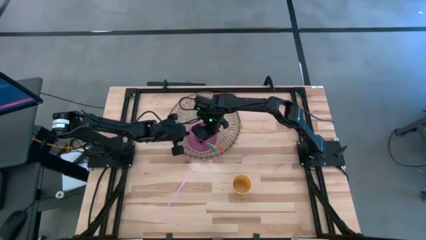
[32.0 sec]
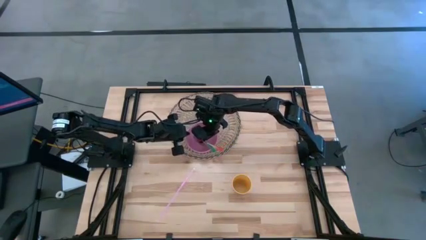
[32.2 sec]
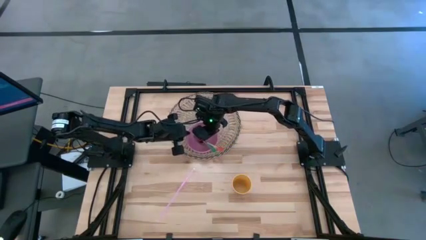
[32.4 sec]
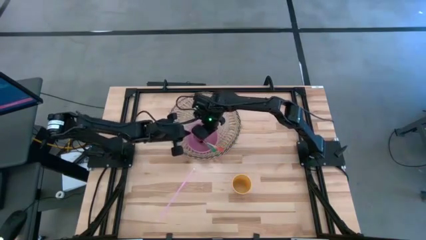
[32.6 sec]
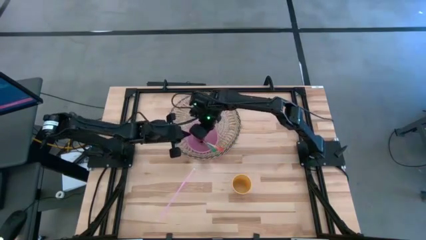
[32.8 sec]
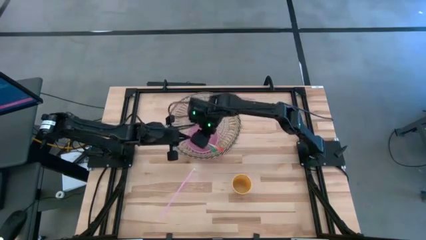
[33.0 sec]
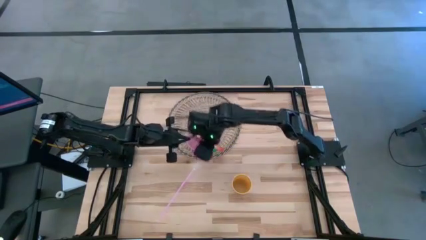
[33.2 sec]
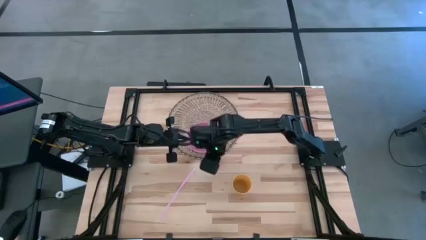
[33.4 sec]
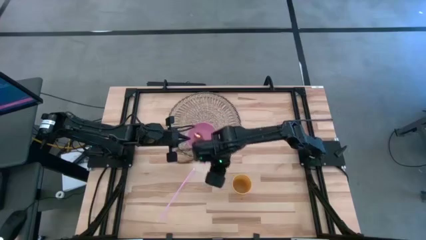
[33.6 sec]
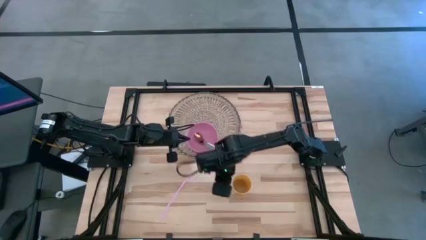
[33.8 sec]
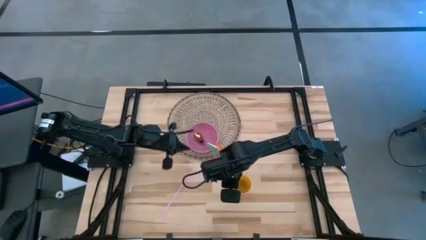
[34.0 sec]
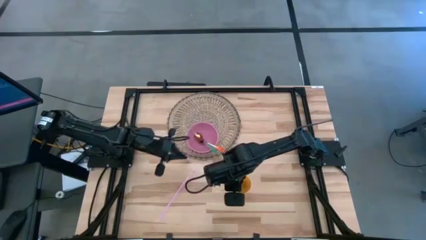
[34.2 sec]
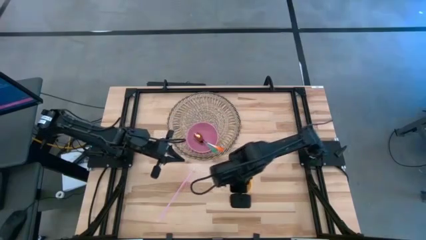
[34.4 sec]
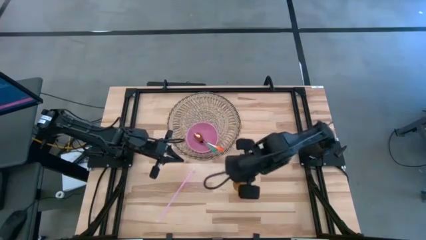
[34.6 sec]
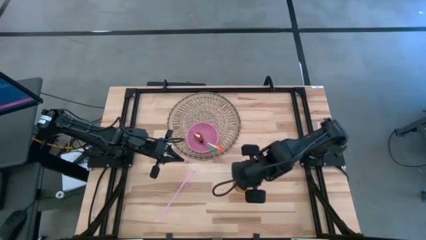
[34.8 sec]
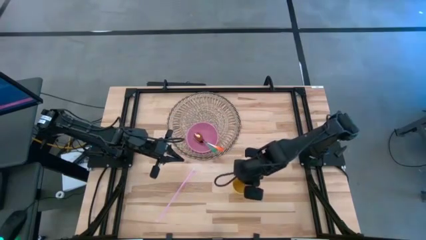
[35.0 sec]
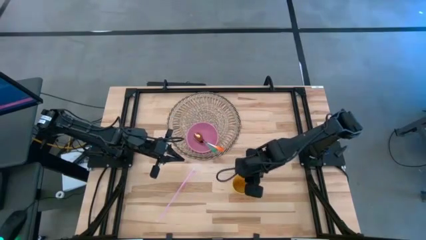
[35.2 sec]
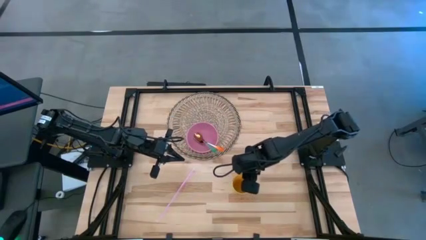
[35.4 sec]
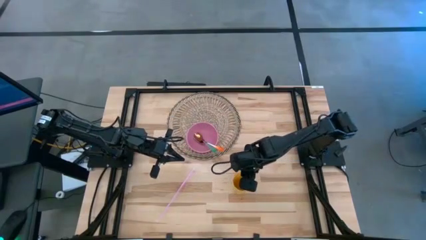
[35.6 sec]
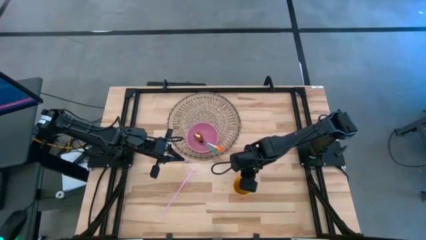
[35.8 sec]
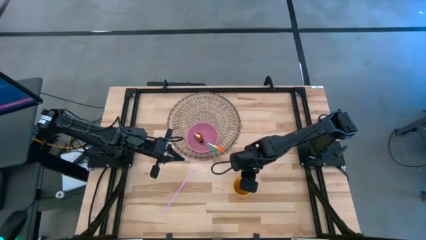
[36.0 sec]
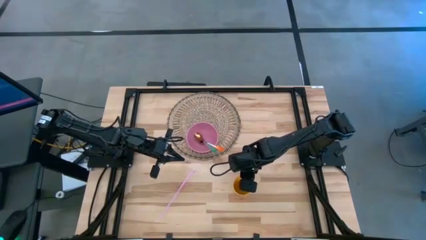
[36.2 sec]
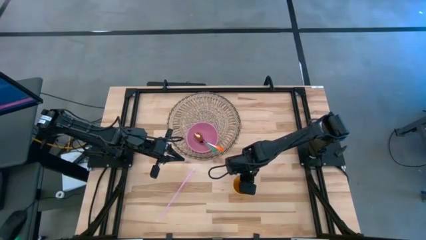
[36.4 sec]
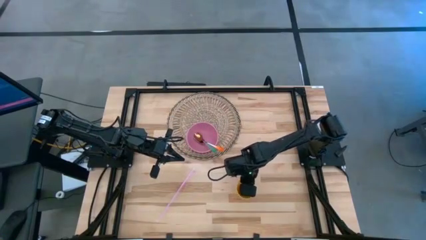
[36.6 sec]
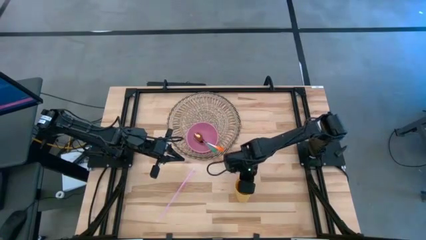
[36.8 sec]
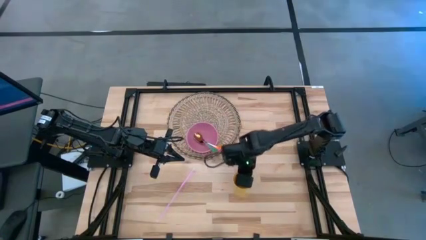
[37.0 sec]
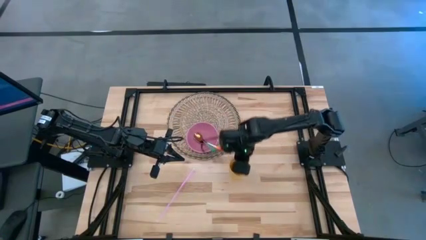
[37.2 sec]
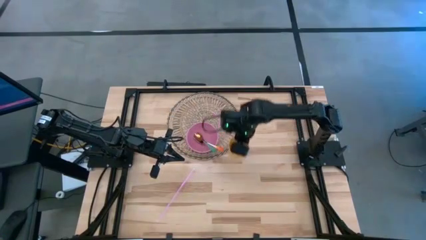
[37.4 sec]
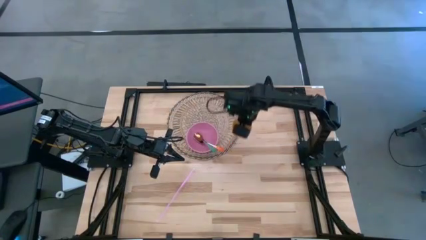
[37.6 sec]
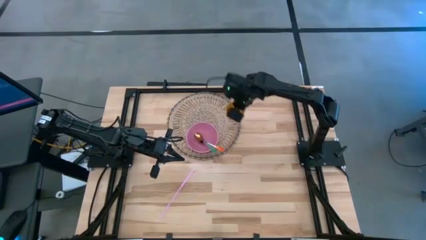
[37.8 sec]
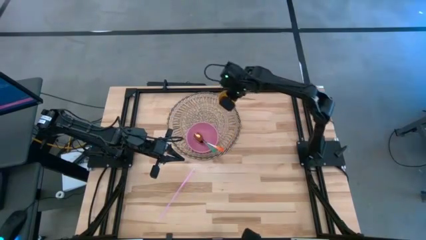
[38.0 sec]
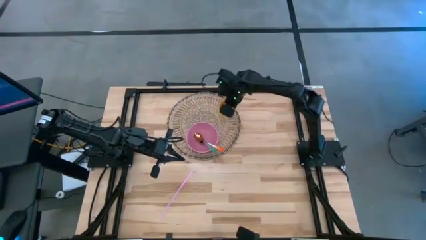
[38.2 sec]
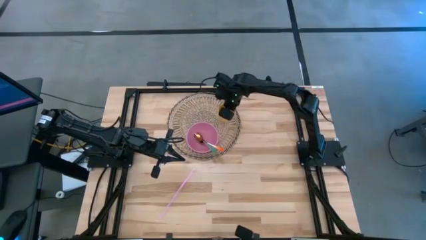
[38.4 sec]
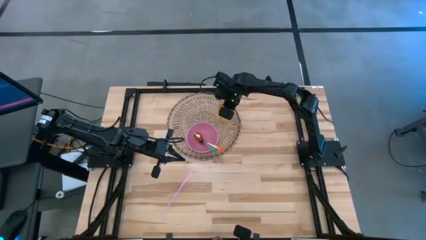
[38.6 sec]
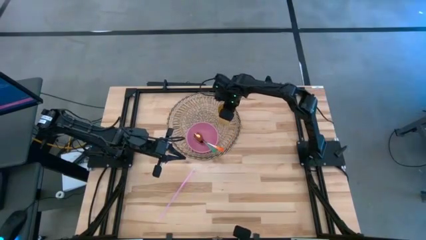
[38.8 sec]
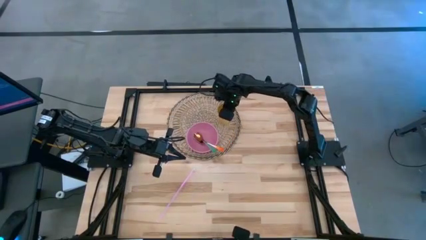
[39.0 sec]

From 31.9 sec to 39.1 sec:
Task: Pick & Place Utensil
Put the yellow cup on the brown table mat

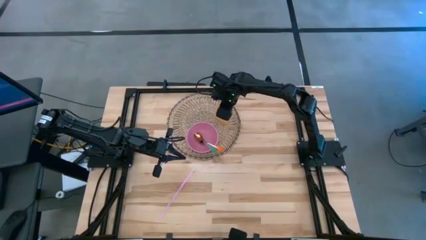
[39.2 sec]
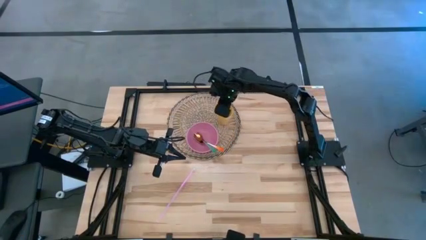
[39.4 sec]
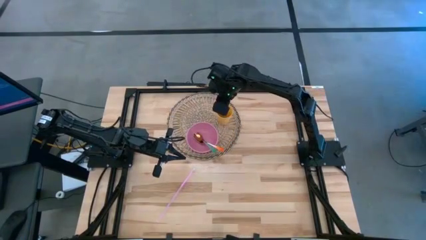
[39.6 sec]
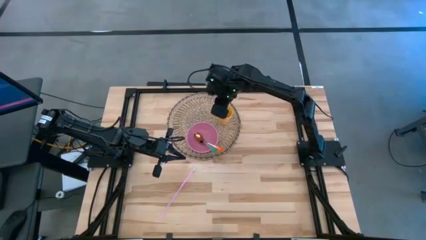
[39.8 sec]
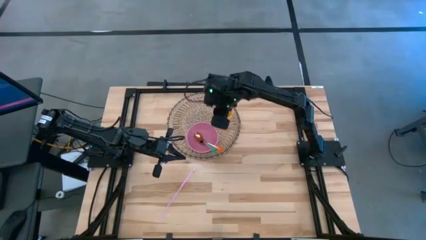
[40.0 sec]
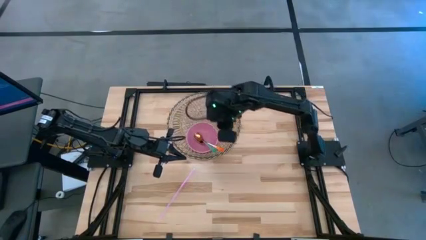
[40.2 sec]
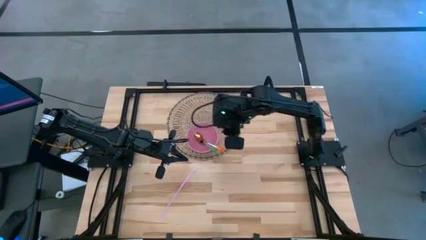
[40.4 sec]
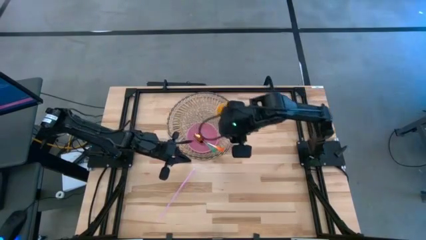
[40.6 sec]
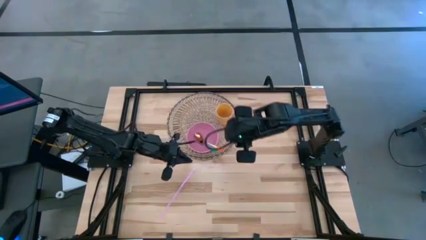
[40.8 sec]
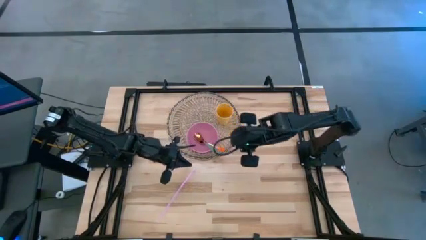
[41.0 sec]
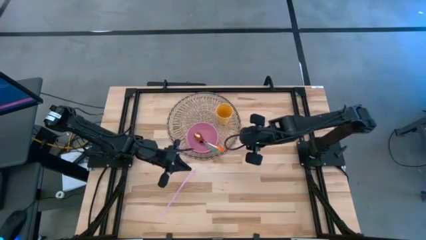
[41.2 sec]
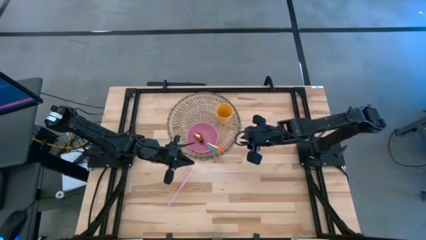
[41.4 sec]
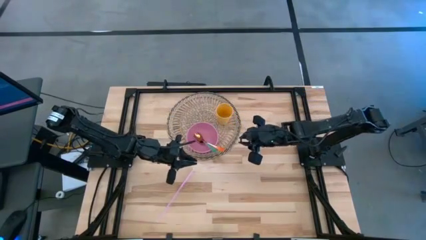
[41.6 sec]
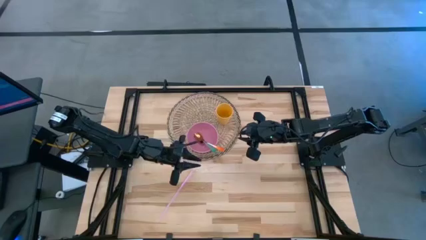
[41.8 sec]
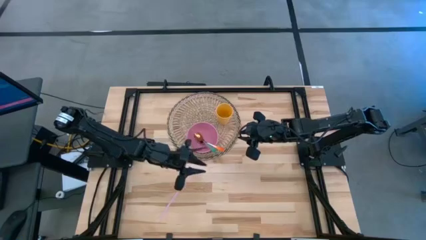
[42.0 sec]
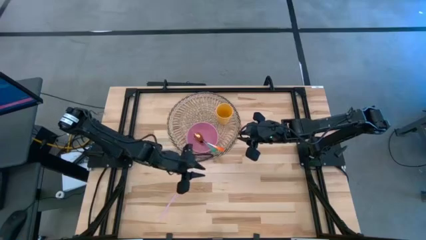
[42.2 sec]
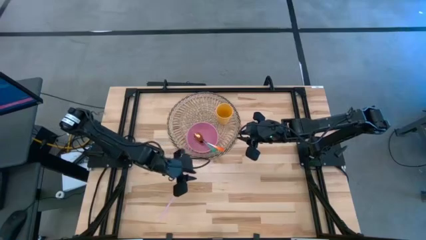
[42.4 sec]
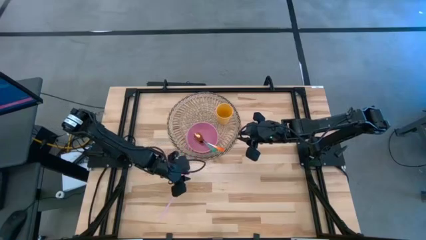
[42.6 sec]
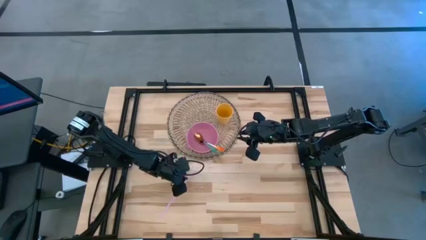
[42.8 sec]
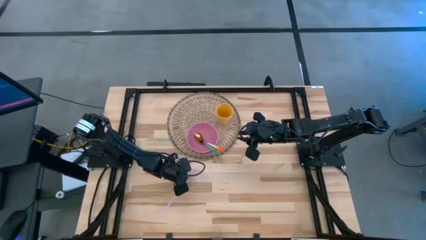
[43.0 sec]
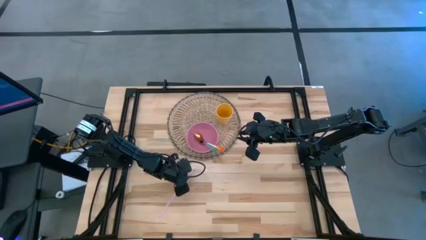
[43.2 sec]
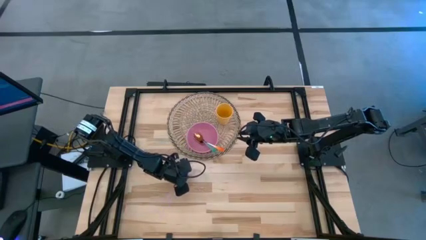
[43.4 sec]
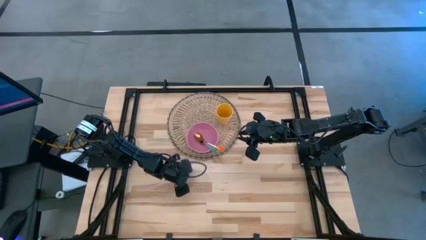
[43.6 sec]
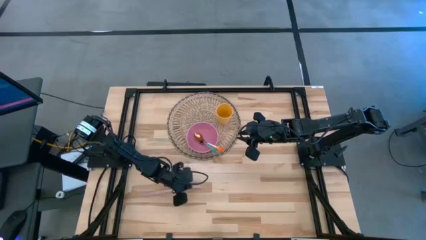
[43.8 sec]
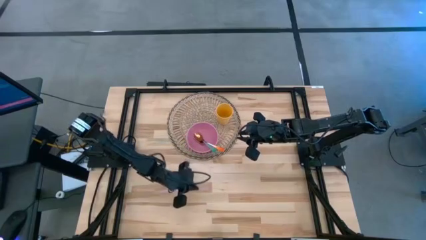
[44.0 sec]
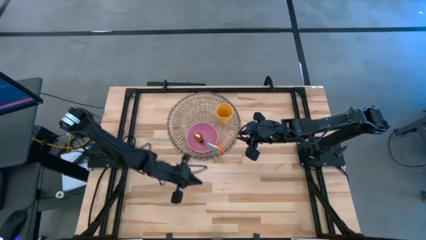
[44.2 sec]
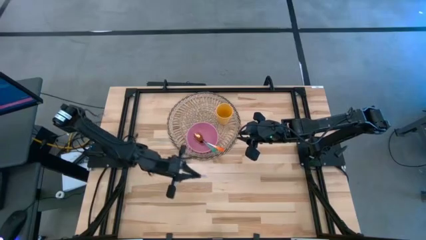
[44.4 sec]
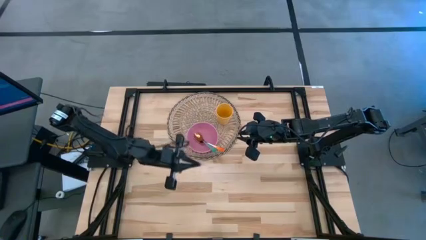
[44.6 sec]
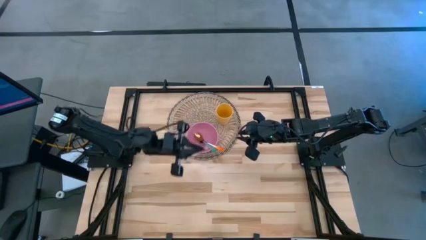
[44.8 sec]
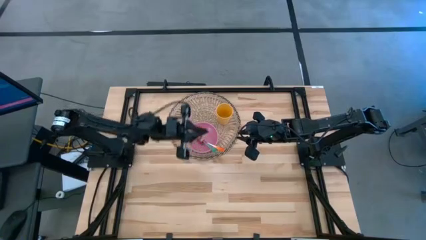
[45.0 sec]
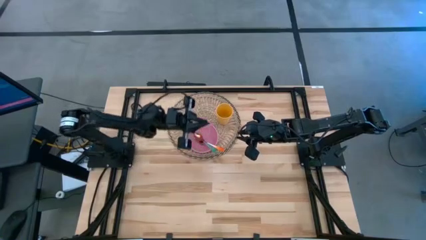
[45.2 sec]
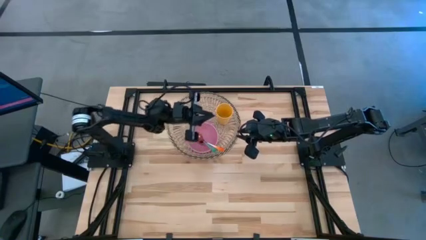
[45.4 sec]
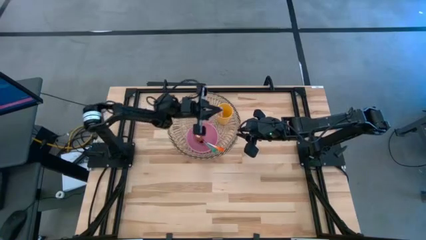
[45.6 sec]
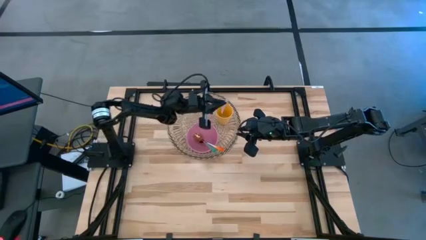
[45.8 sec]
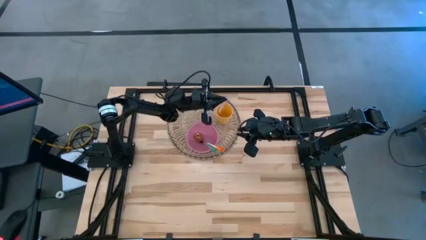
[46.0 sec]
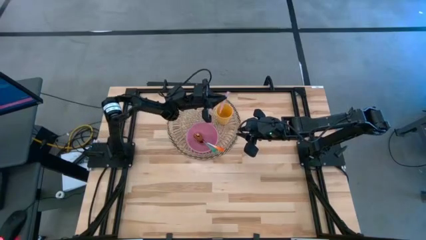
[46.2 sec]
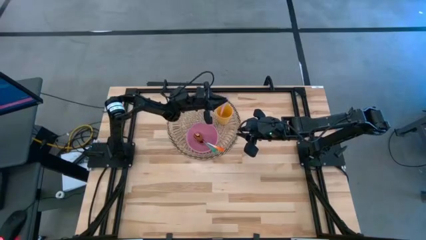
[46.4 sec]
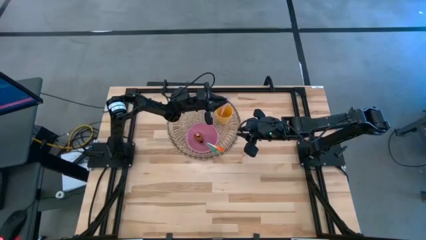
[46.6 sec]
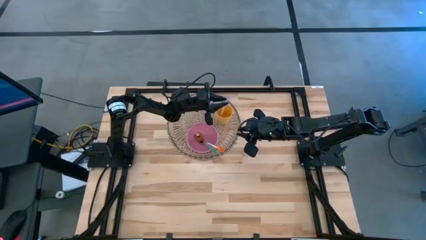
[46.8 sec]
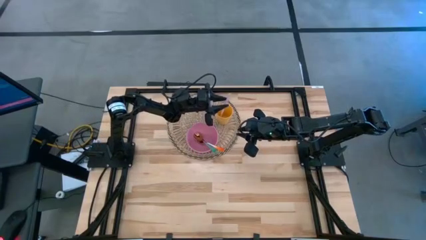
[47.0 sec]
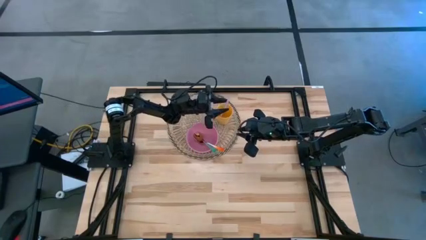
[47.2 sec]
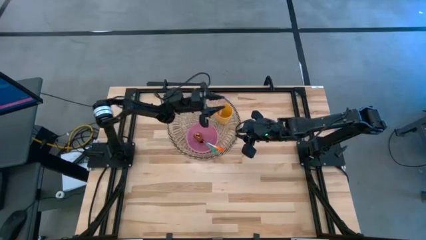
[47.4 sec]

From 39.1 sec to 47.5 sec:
Put the pink straw into the yellow cup
